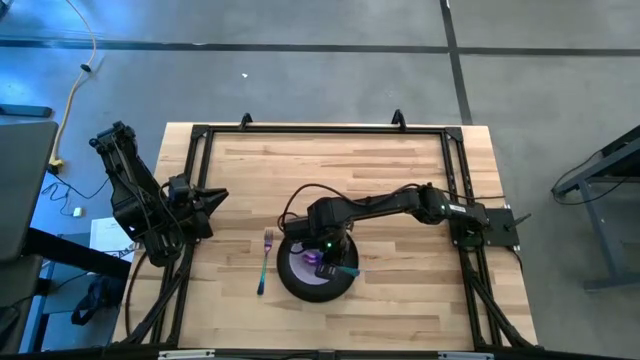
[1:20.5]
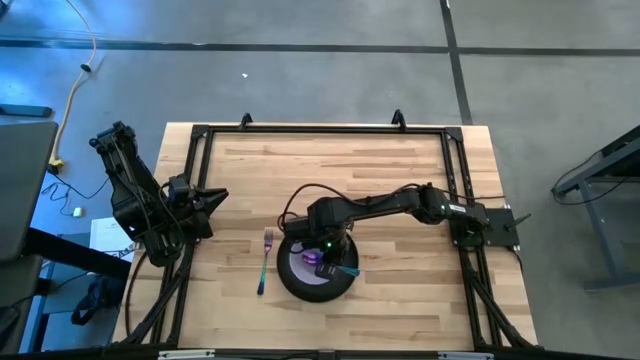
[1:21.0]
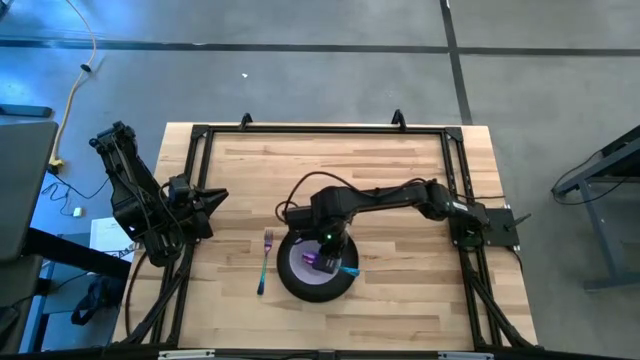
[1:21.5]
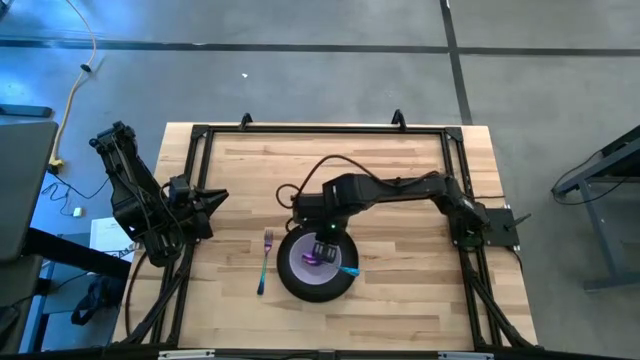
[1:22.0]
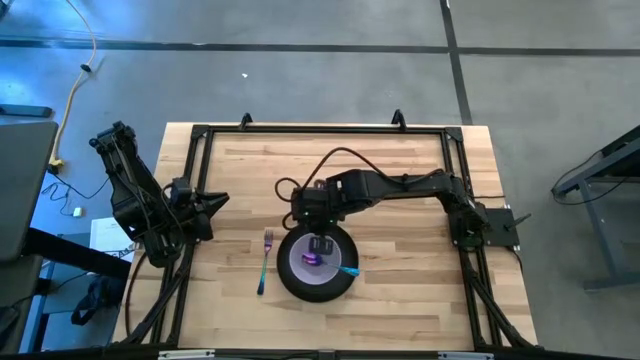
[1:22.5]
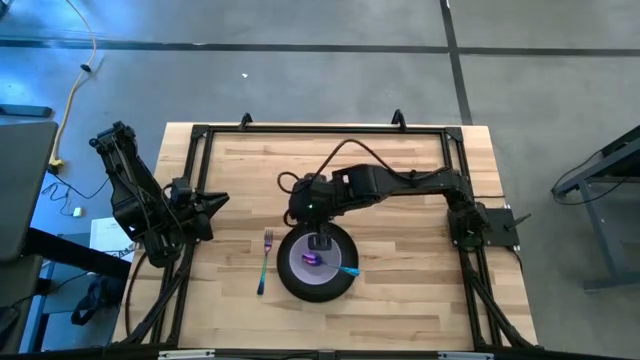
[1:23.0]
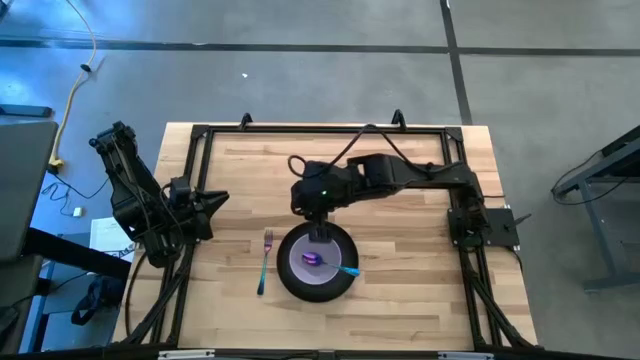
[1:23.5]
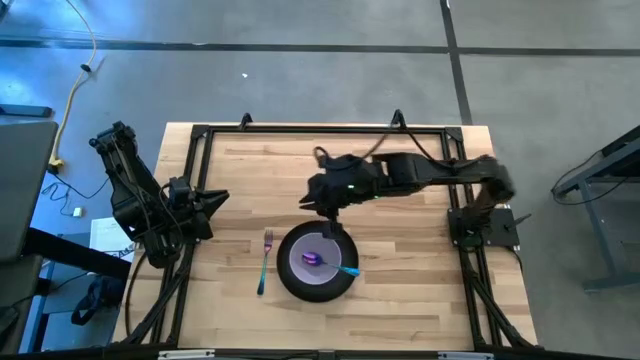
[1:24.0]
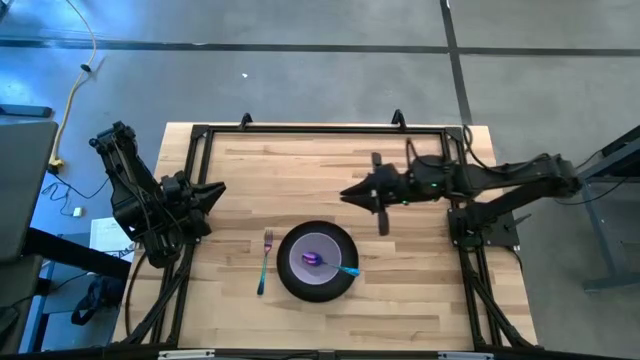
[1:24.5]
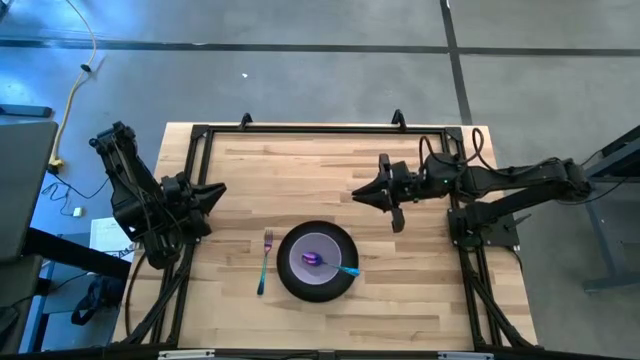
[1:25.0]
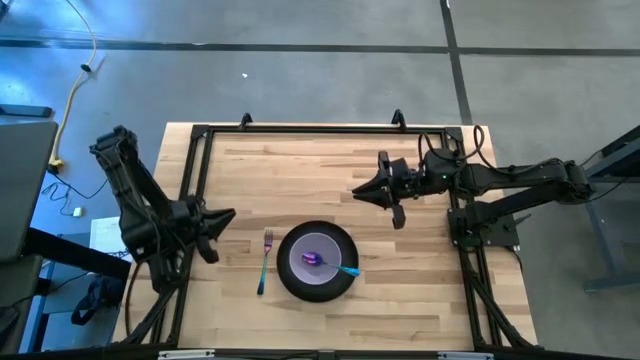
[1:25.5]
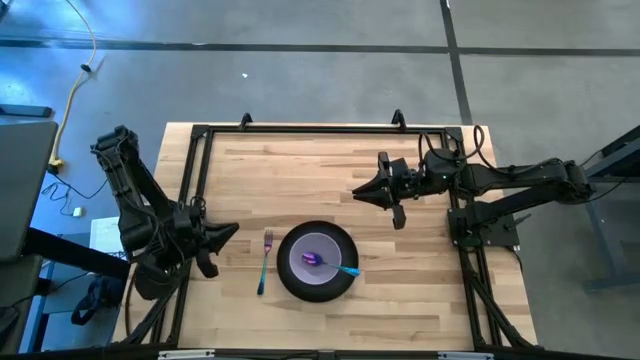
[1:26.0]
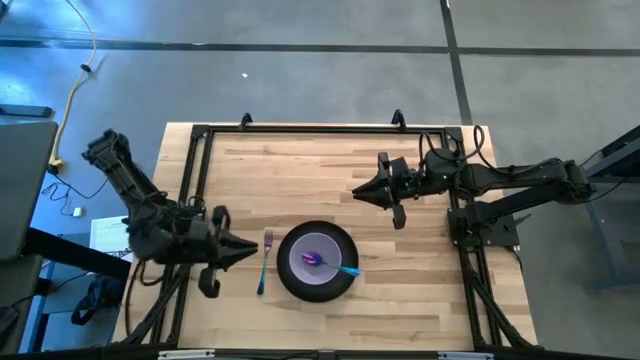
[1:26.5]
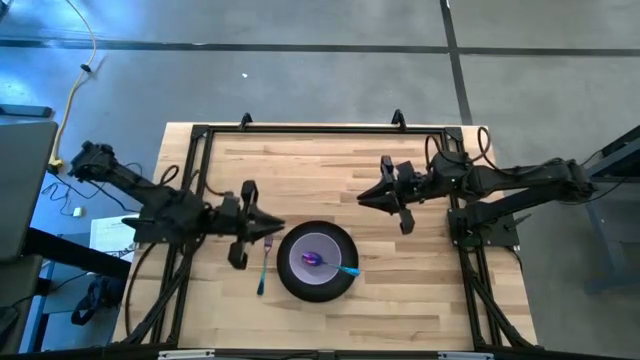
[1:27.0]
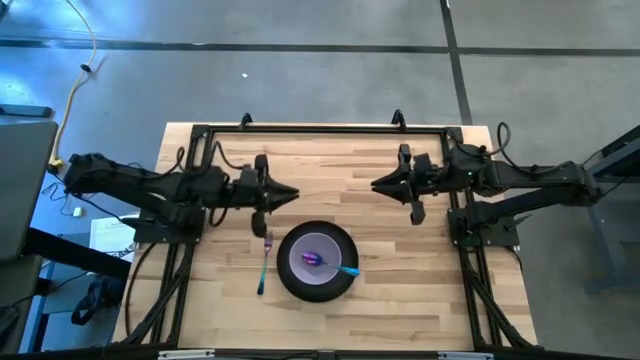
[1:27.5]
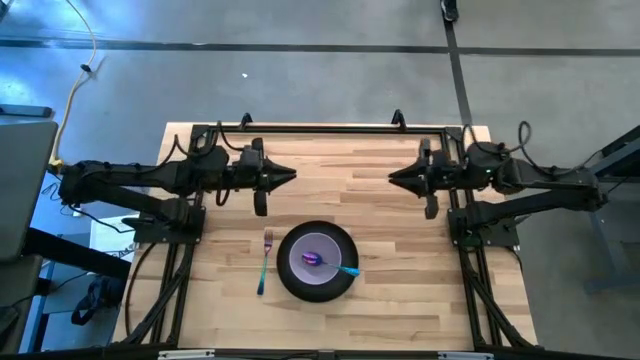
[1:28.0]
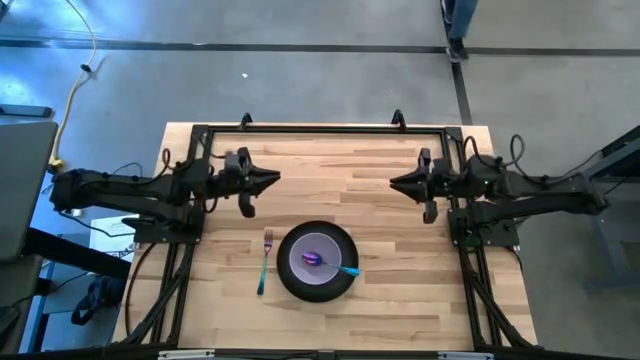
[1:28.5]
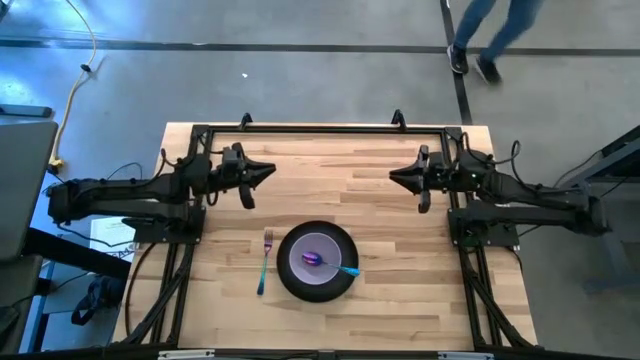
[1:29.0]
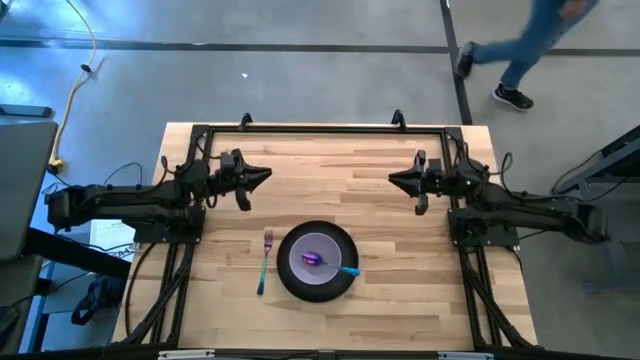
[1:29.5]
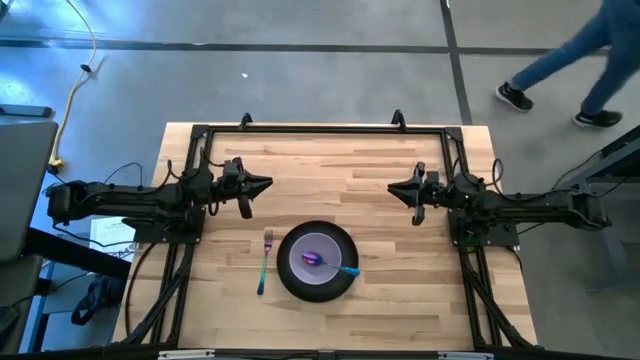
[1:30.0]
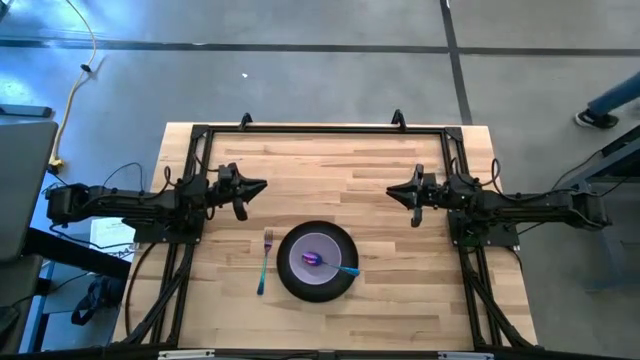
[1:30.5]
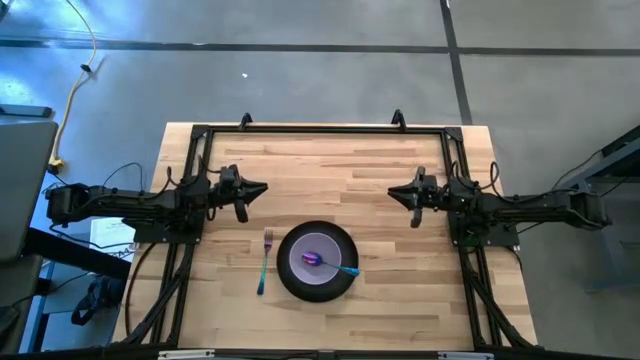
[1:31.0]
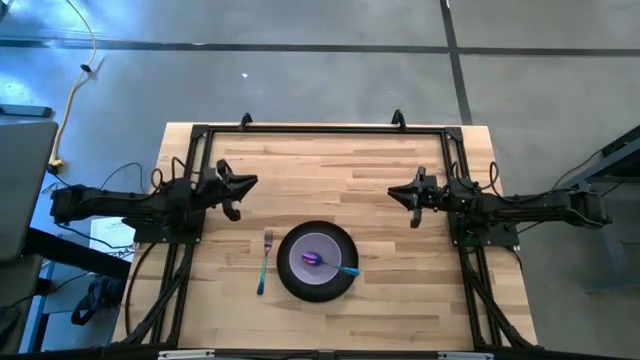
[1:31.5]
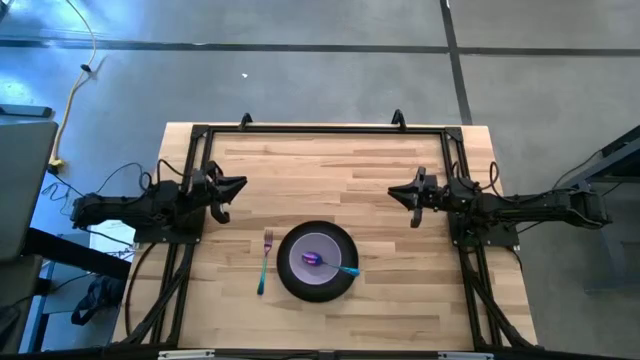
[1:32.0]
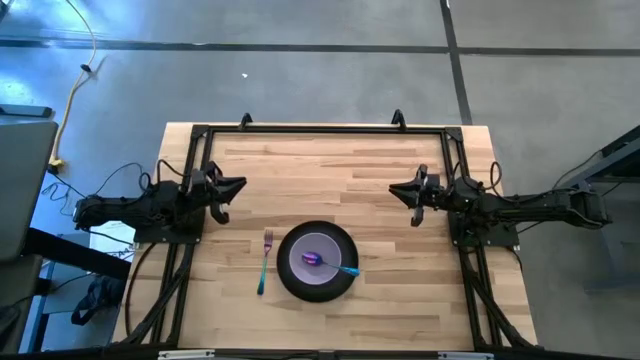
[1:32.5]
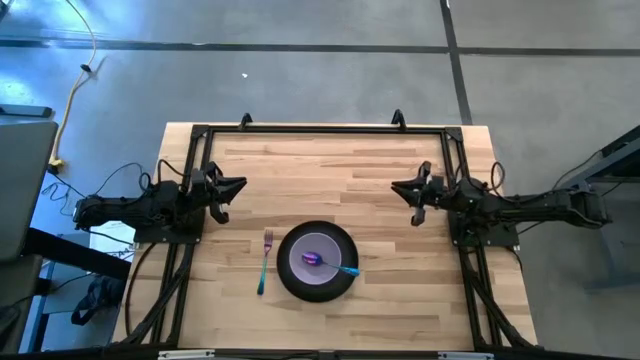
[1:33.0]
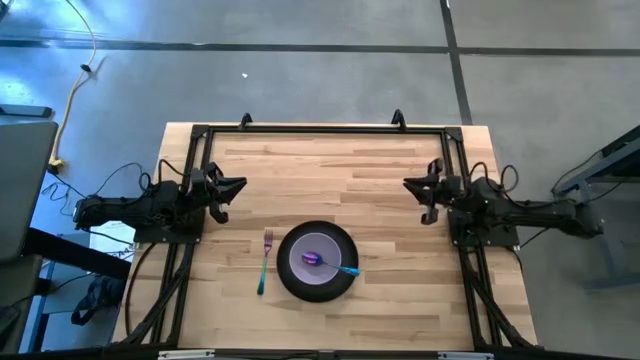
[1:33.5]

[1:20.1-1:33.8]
Task: Set table place
Return to Home Position

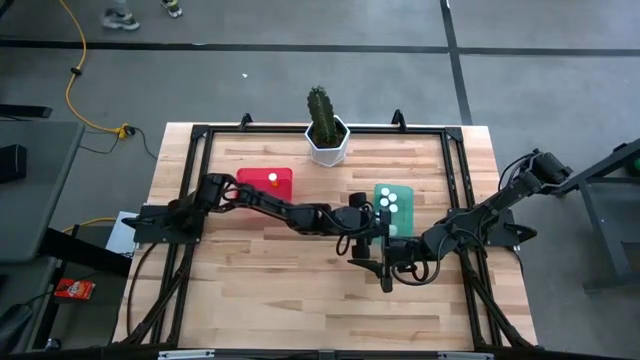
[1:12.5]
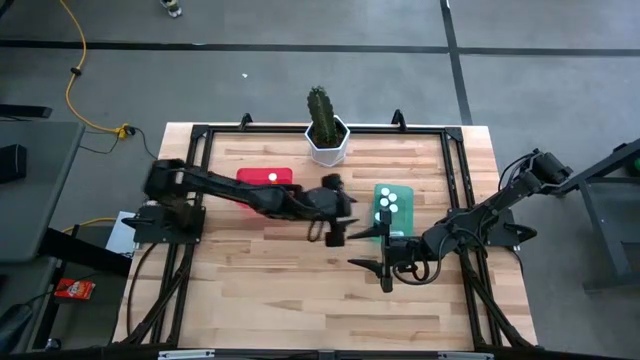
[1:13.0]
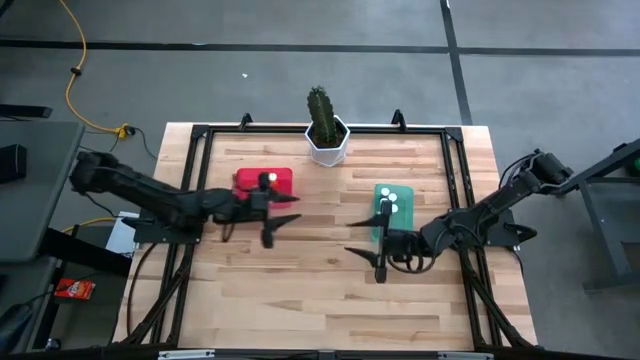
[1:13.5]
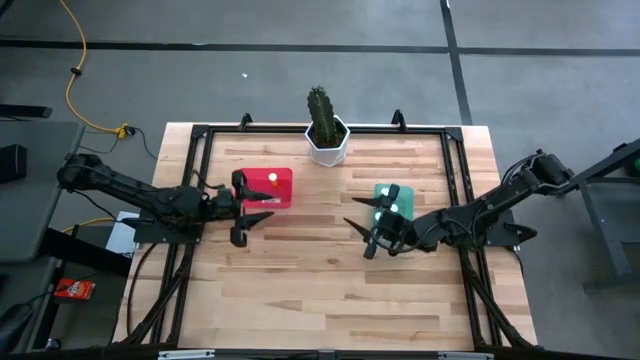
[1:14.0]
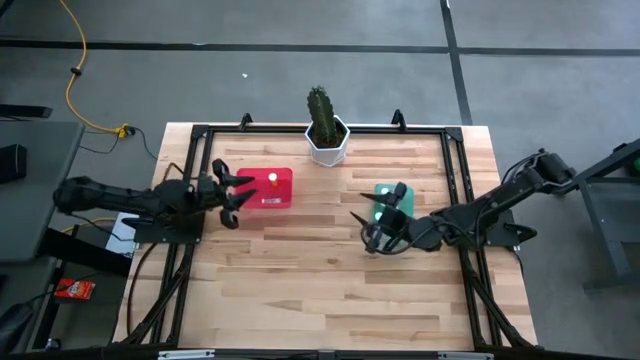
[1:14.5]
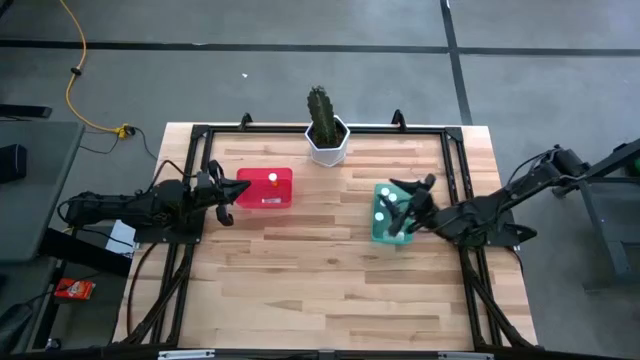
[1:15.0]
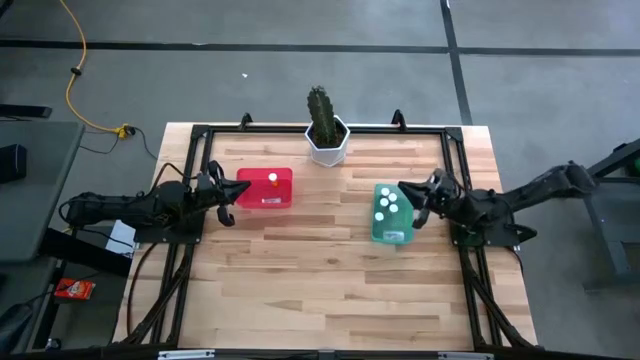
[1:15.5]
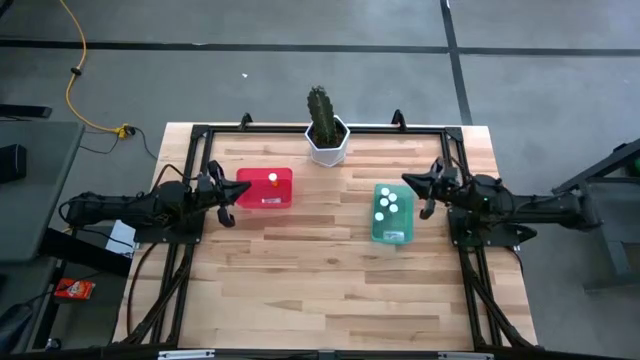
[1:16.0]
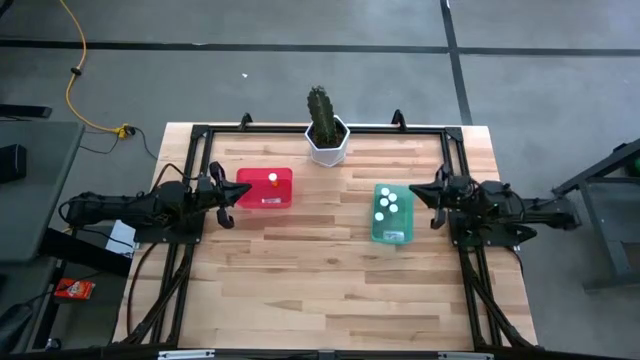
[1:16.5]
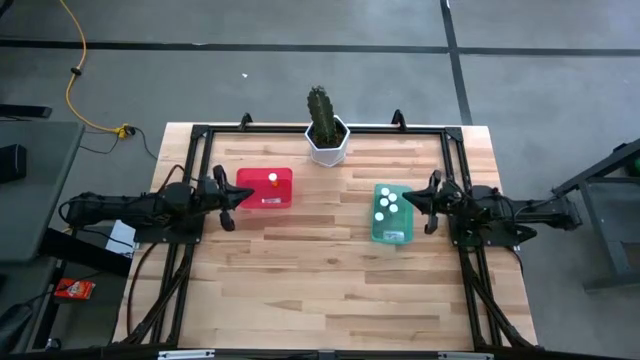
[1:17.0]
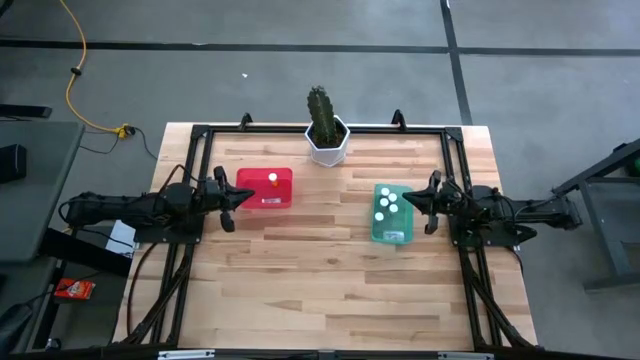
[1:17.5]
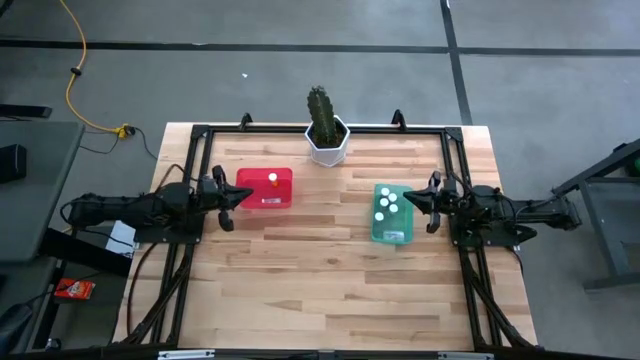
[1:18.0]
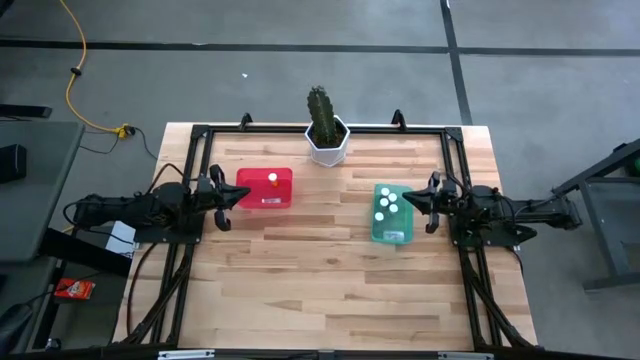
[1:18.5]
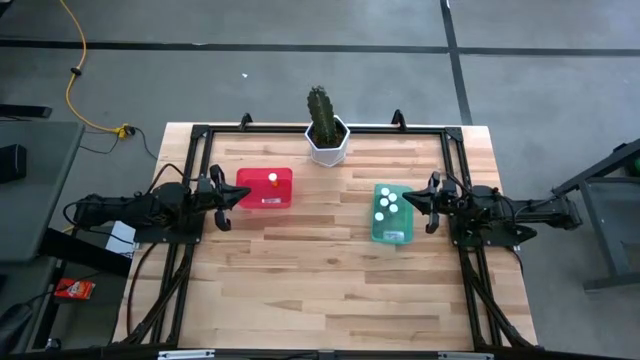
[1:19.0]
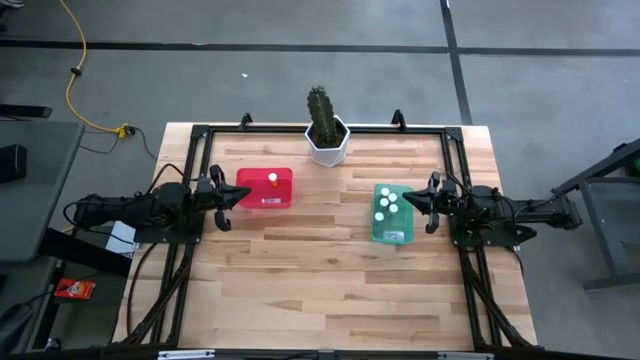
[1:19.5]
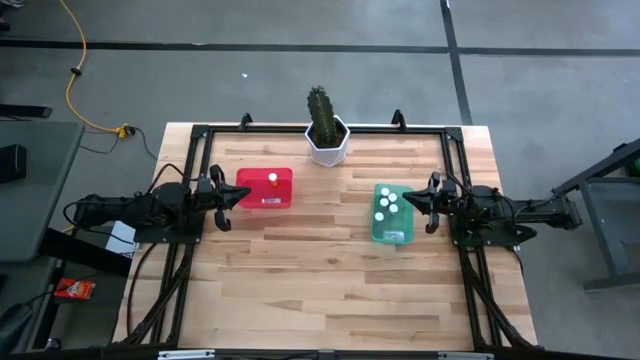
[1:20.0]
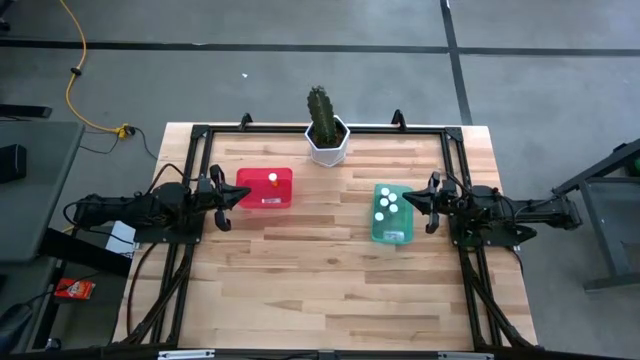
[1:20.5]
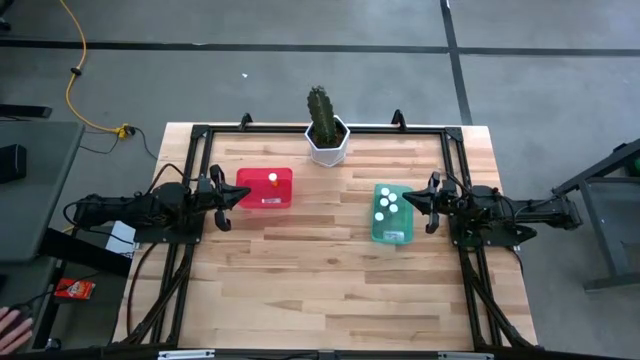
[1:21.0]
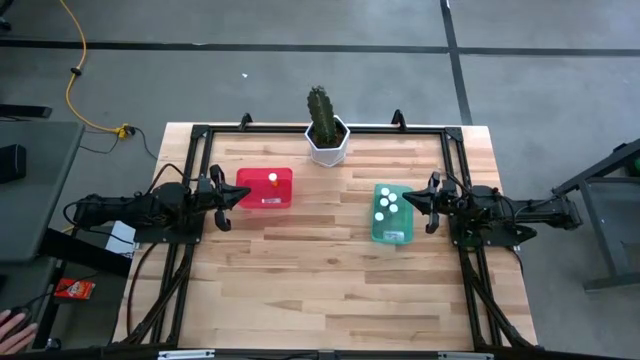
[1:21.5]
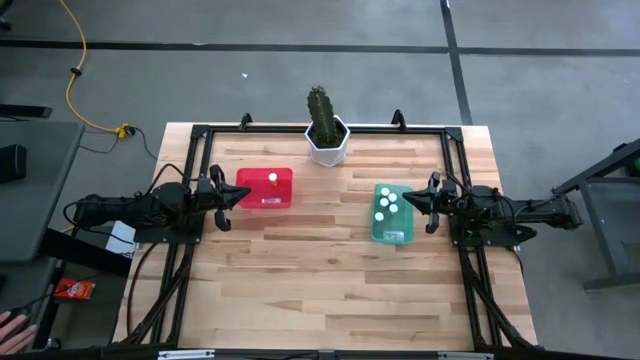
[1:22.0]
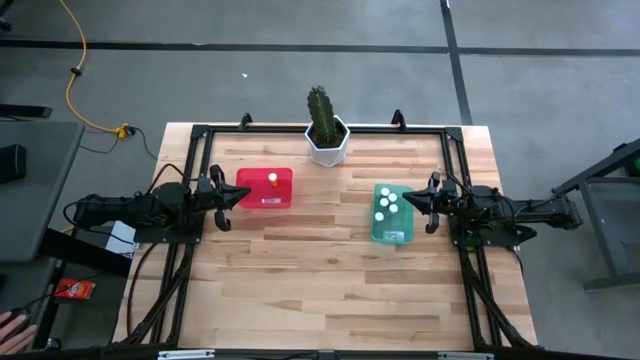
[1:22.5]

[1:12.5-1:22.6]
Task: Pick and place medicine bottles into bin by pill shape (circle, oval)
Return to home position
